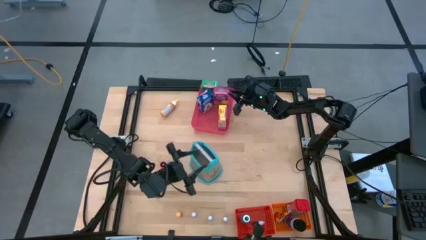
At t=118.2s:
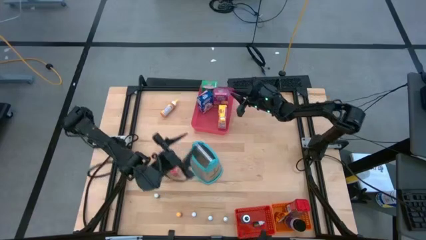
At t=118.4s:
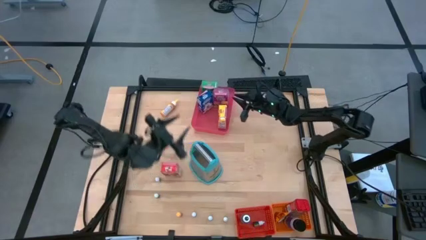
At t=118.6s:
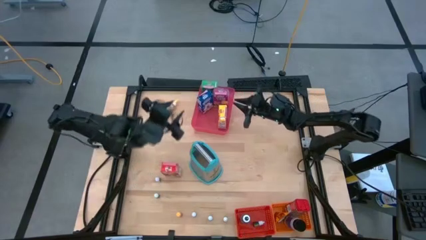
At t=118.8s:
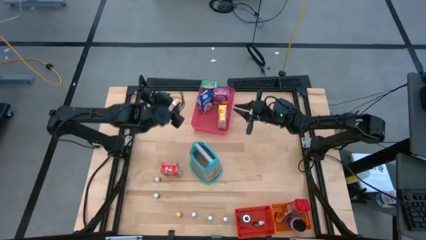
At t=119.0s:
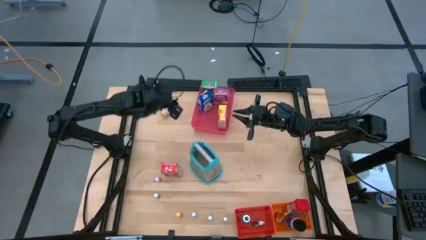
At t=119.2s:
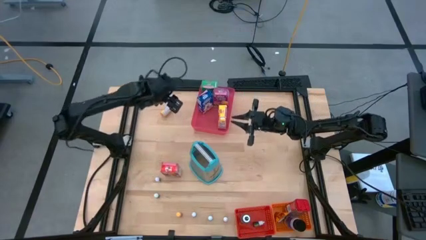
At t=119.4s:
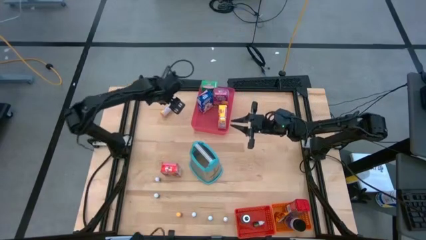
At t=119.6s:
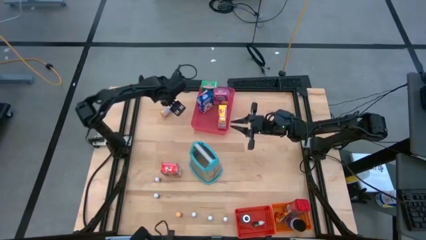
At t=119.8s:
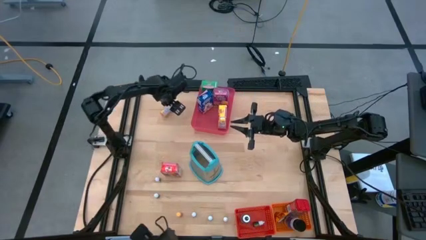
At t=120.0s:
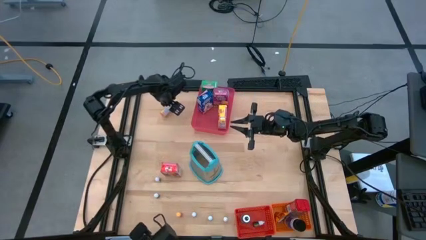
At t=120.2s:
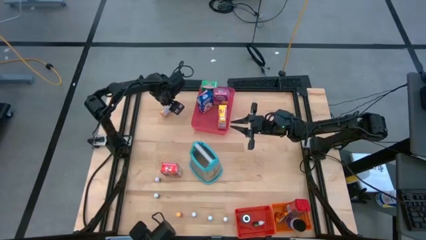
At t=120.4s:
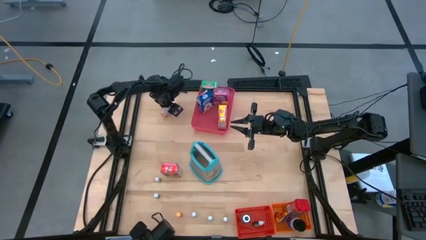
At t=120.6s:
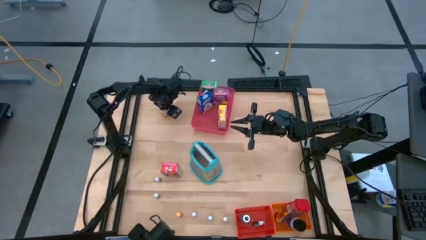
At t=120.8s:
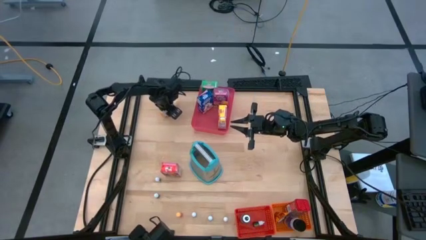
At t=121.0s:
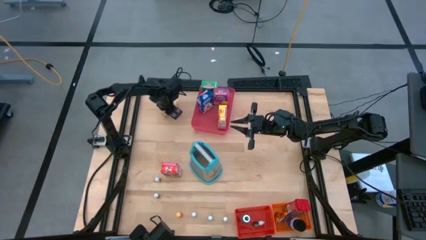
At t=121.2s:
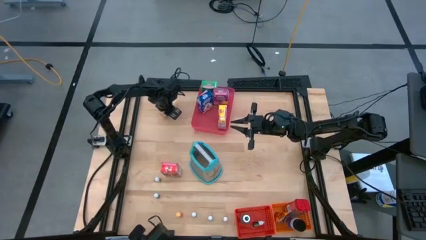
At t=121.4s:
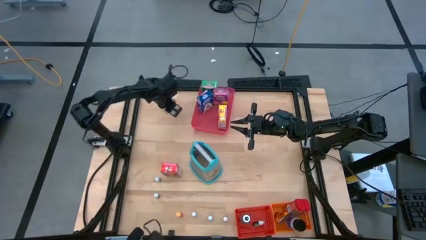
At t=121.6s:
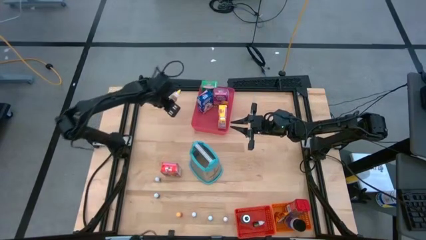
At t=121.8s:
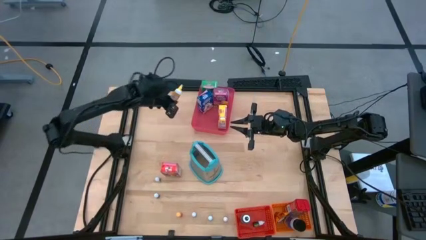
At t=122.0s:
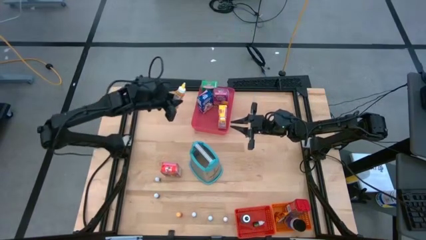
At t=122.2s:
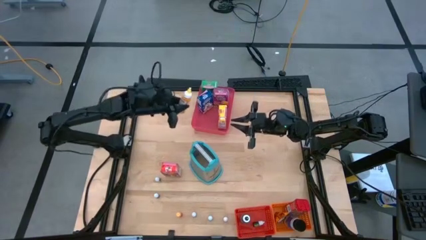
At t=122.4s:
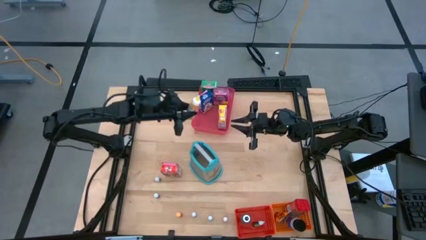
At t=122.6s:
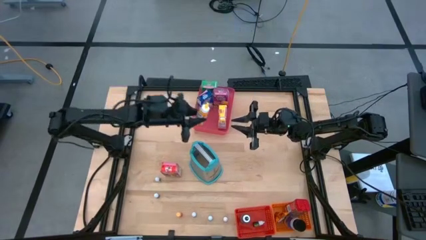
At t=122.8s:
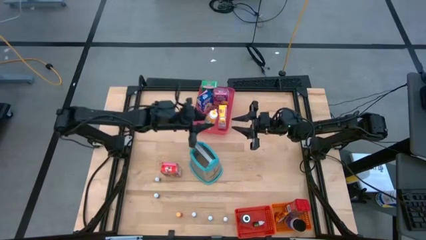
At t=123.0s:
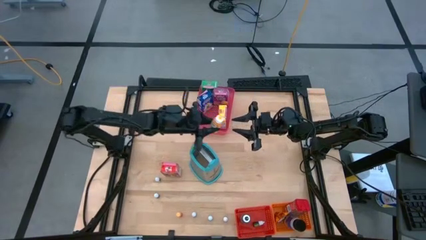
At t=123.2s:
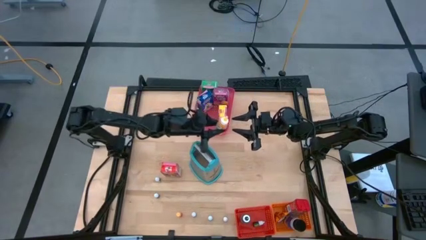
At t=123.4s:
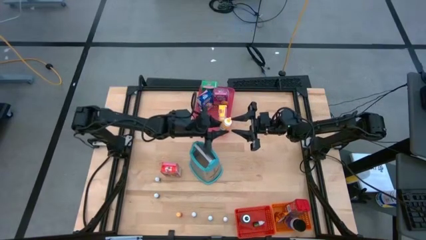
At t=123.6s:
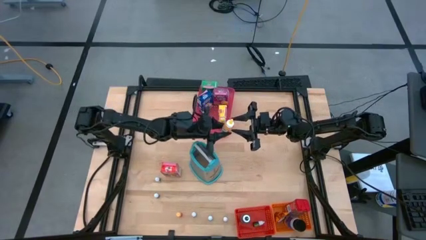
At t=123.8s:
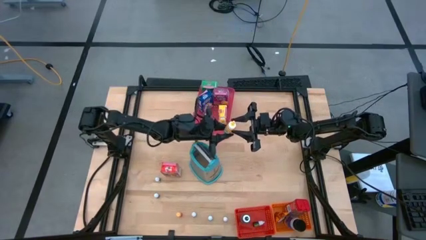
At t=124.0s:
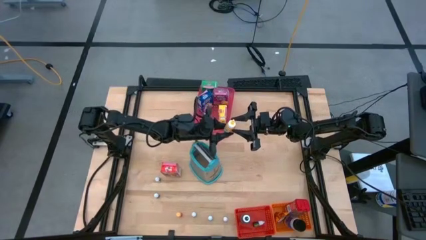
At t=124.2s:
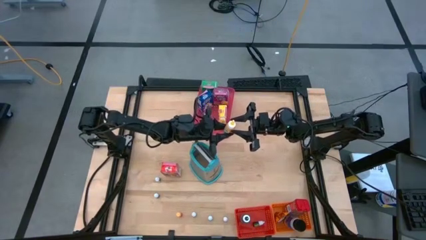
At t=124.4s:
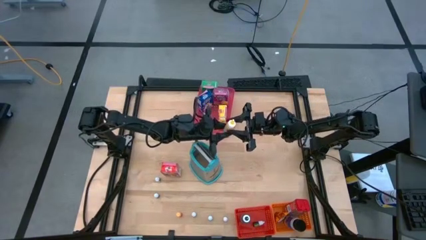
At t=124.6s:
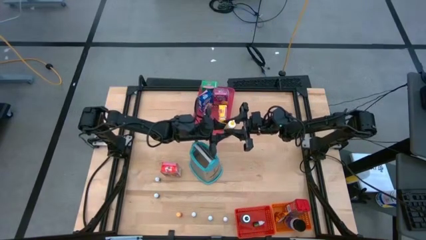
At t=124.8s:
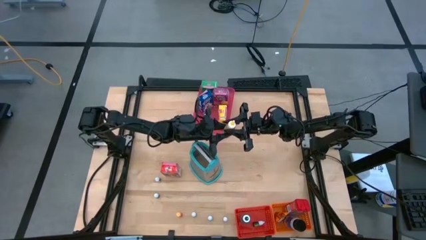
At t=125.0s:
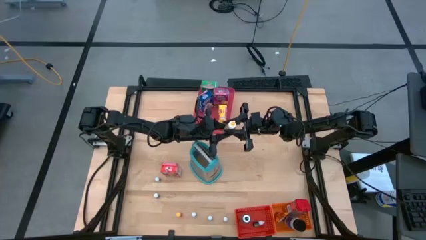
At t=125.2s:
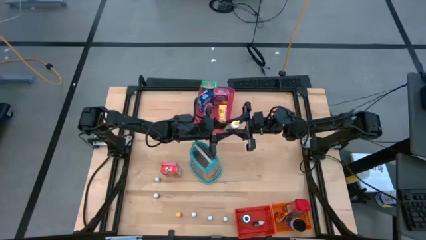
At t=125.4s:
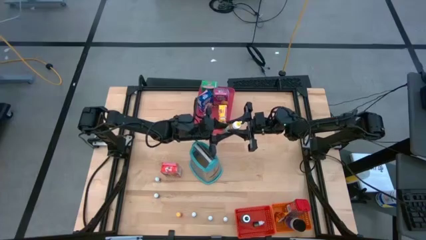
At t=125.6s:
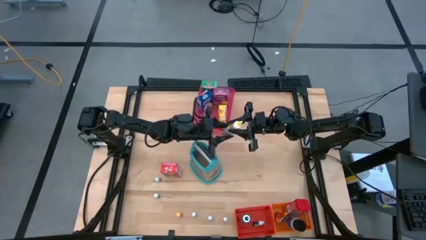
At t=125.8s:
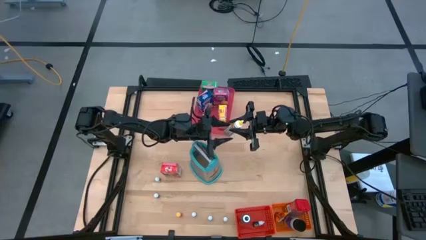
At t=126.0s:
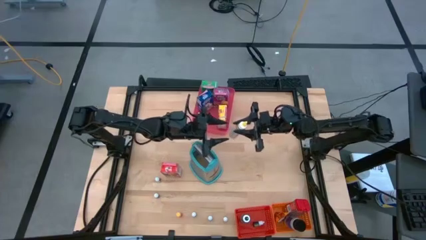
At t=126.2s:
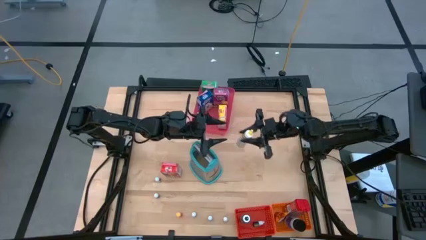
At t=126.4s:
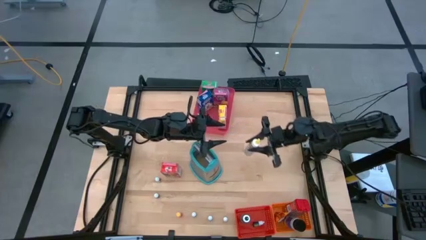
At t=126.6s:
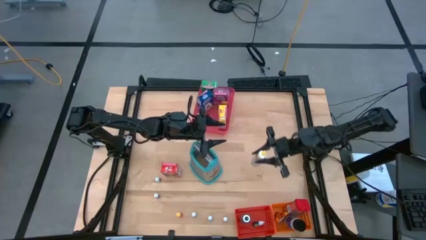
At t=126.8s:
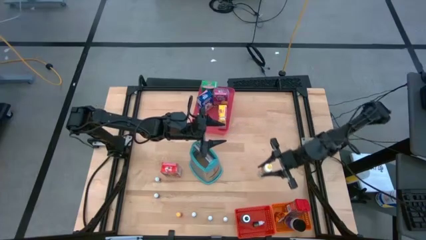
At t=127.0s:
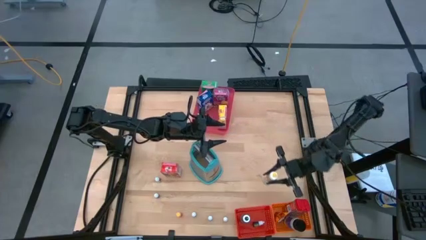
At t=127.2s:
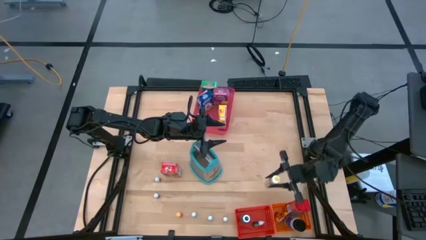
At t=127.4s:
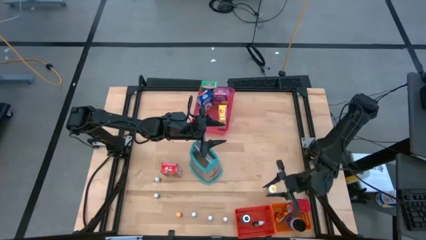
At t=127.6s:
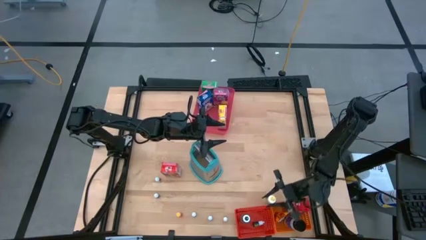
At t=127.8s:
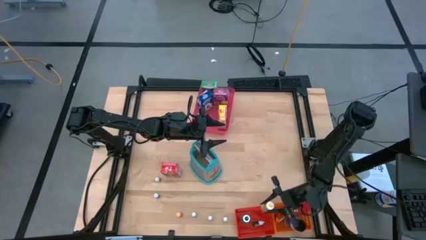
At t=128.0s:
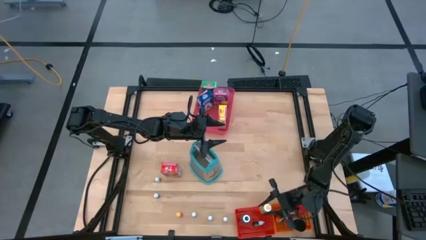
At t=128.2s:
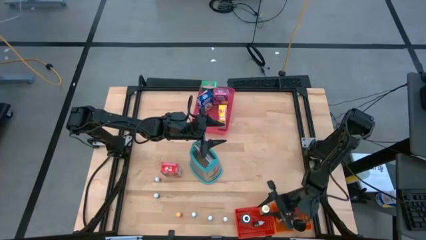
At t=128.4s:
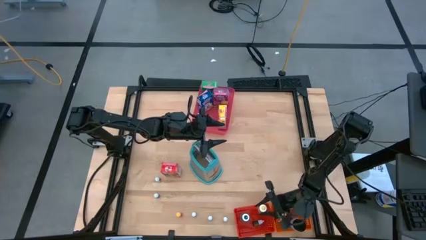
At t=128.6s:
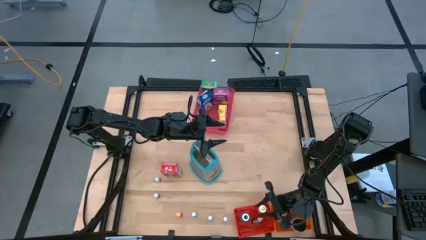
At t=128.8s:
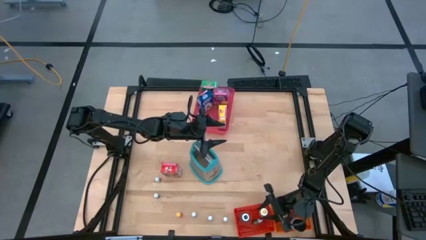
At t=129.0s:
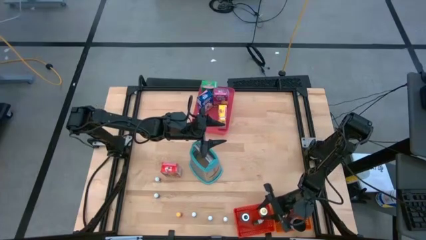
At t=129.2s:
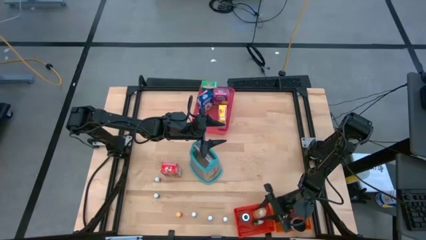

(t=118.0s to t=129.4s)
Task: Pick & Place Kitchen Items
Put the yellow food coloring bottle into the red bin
